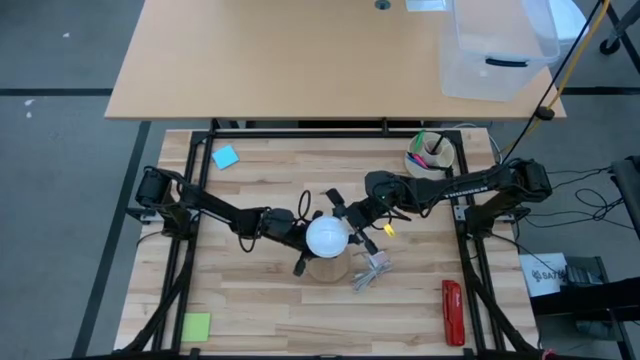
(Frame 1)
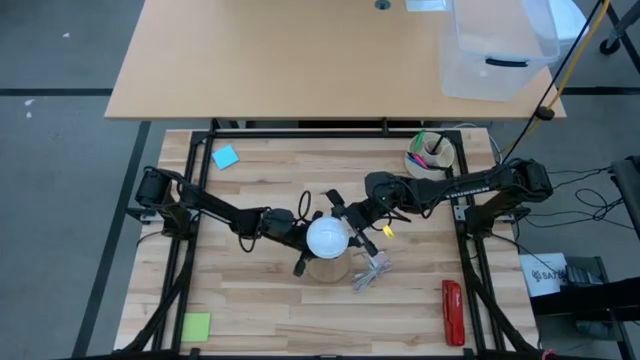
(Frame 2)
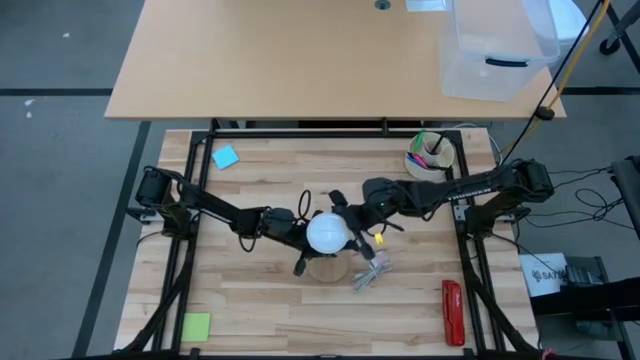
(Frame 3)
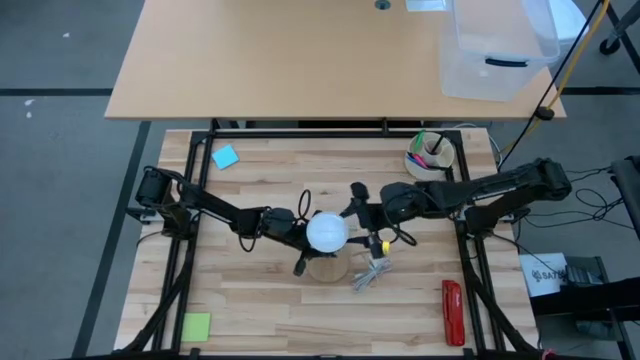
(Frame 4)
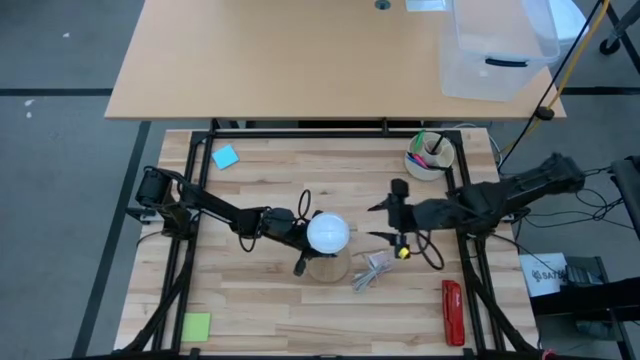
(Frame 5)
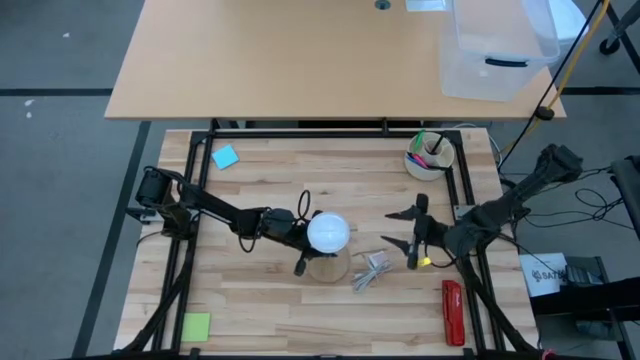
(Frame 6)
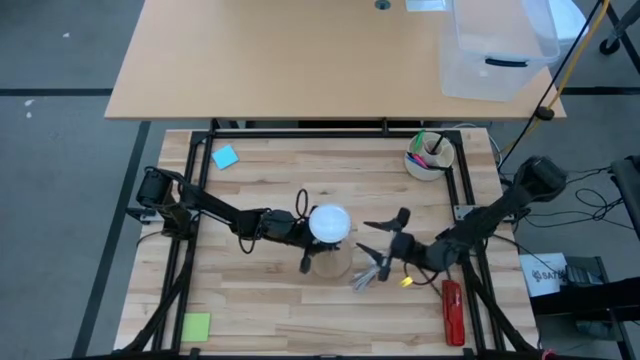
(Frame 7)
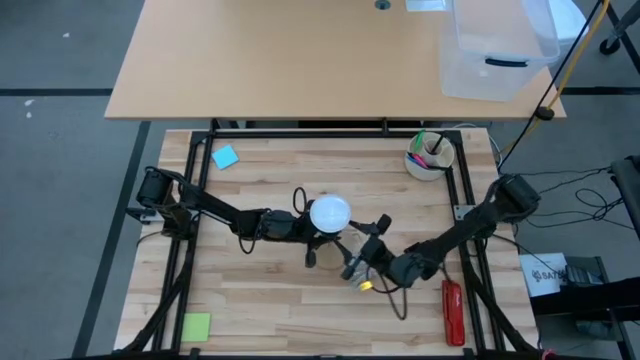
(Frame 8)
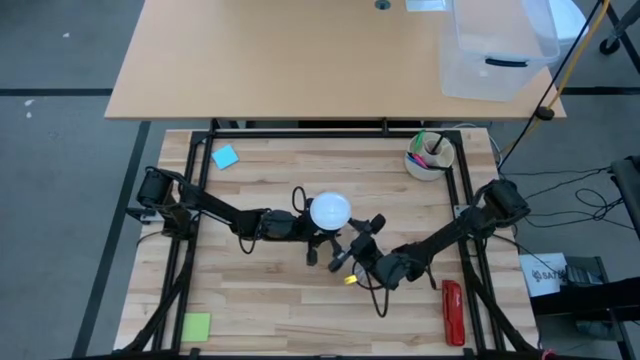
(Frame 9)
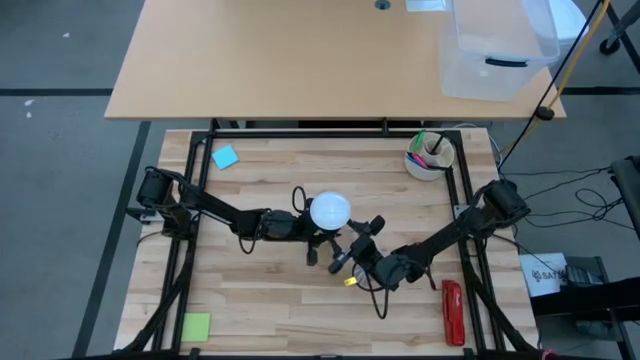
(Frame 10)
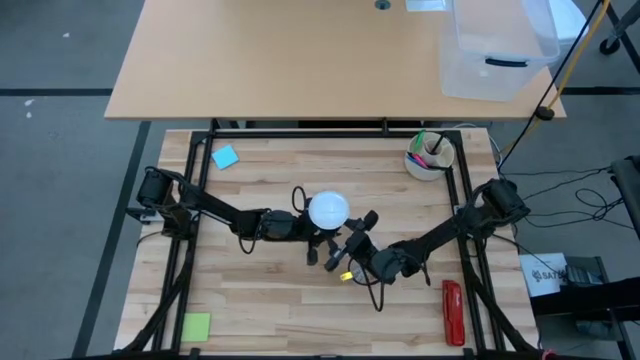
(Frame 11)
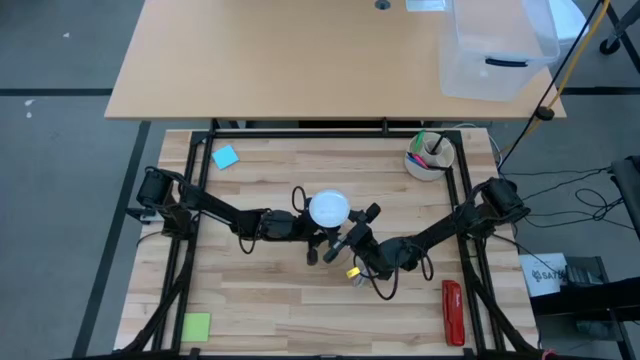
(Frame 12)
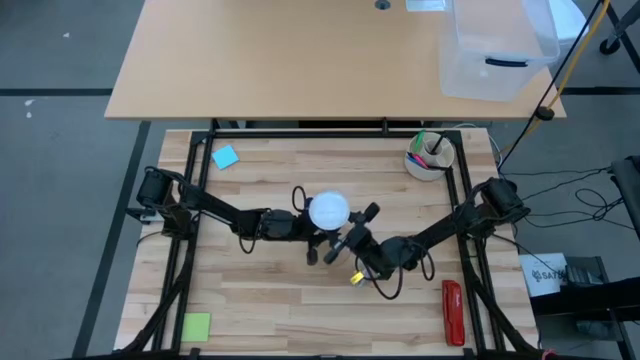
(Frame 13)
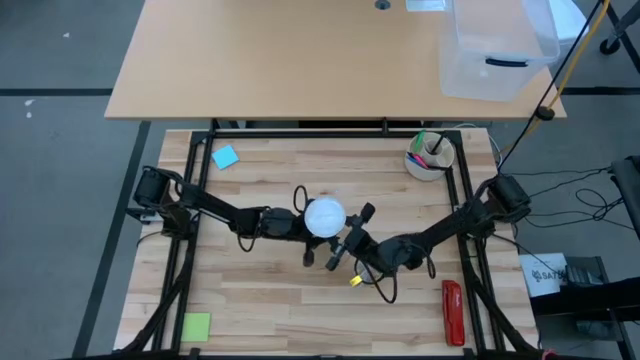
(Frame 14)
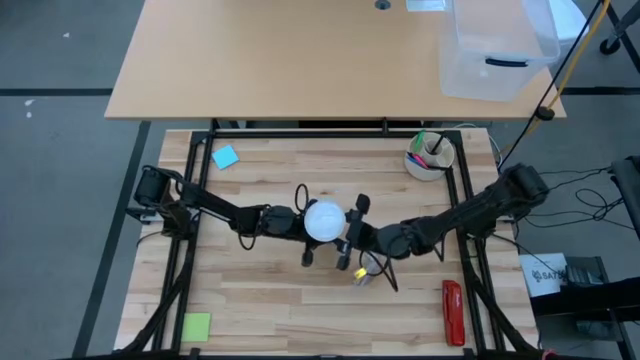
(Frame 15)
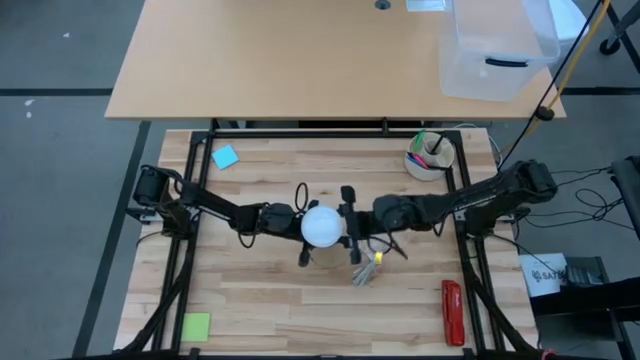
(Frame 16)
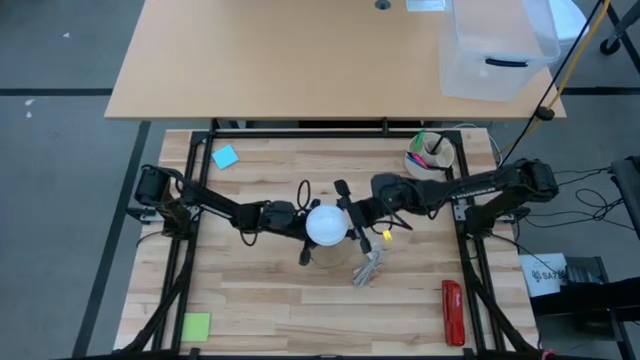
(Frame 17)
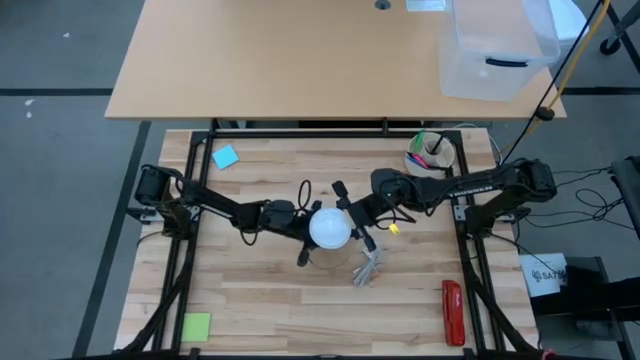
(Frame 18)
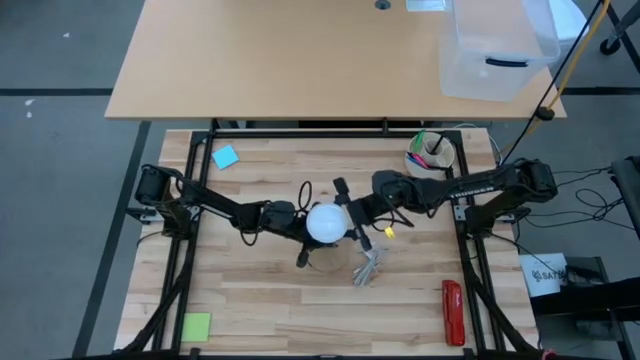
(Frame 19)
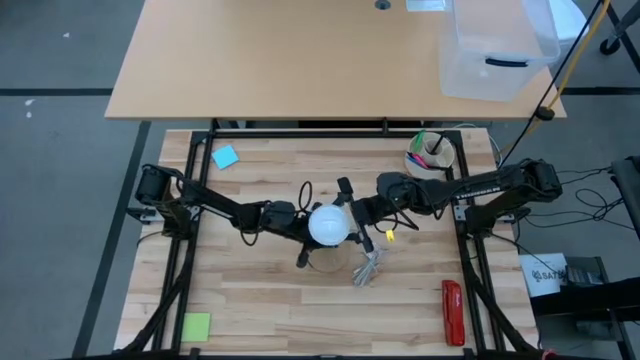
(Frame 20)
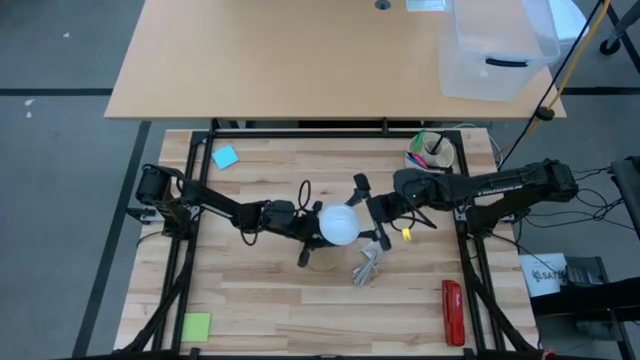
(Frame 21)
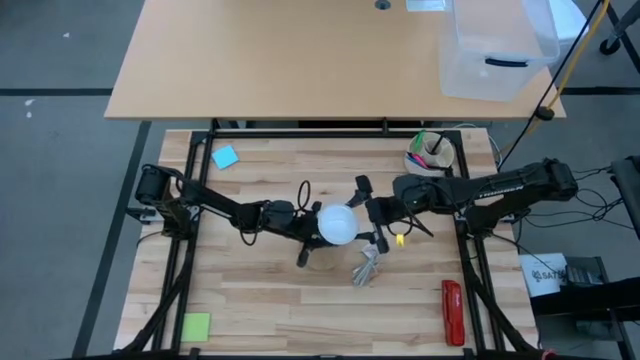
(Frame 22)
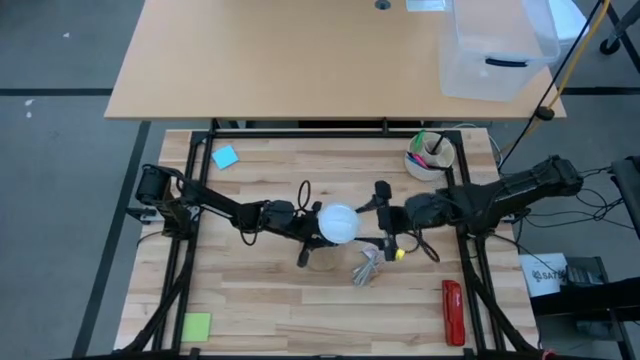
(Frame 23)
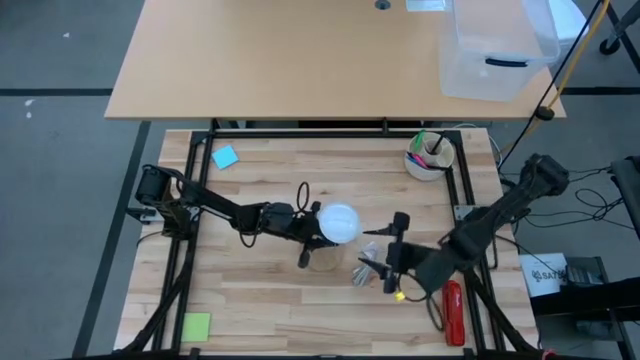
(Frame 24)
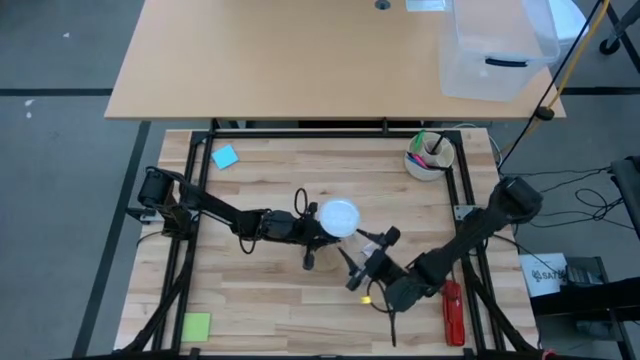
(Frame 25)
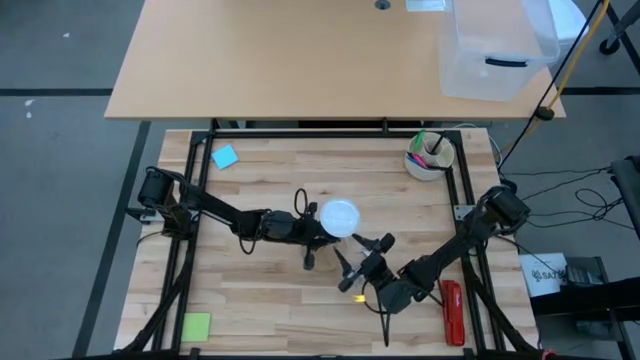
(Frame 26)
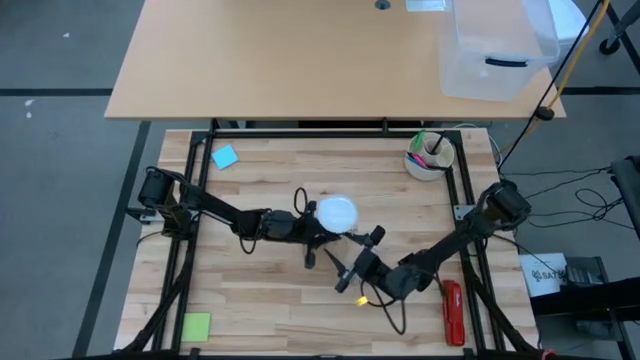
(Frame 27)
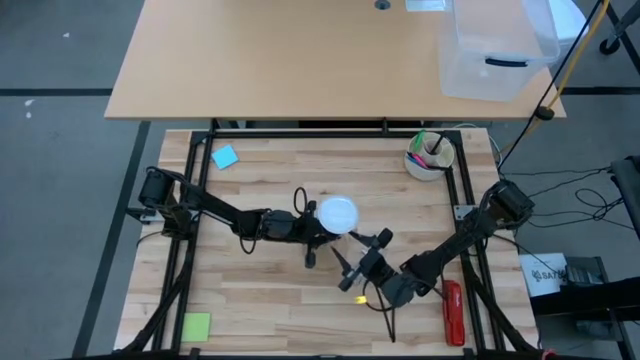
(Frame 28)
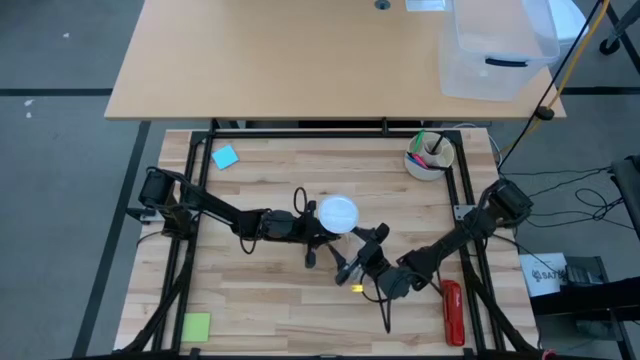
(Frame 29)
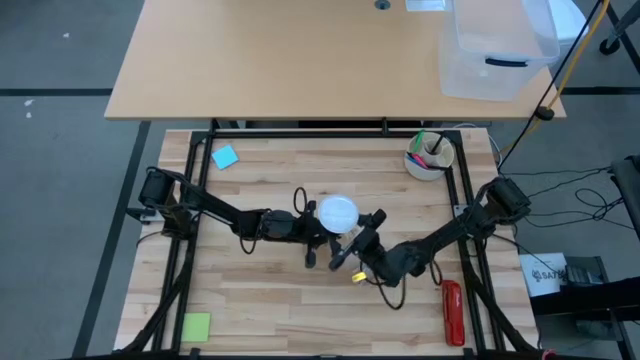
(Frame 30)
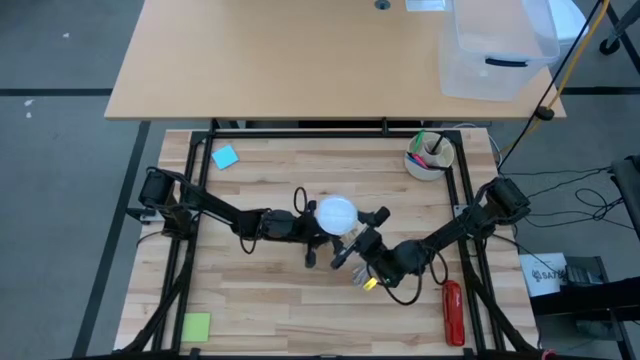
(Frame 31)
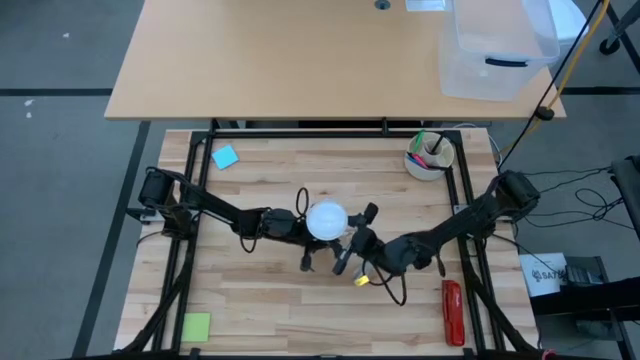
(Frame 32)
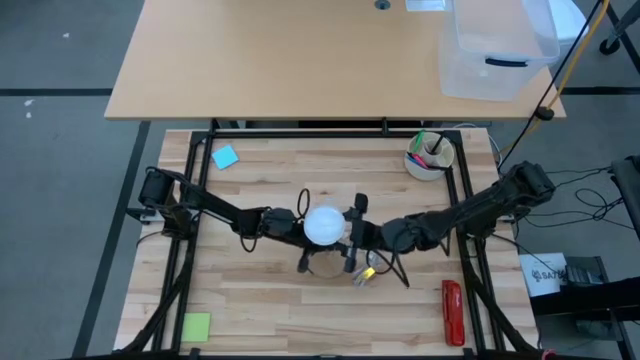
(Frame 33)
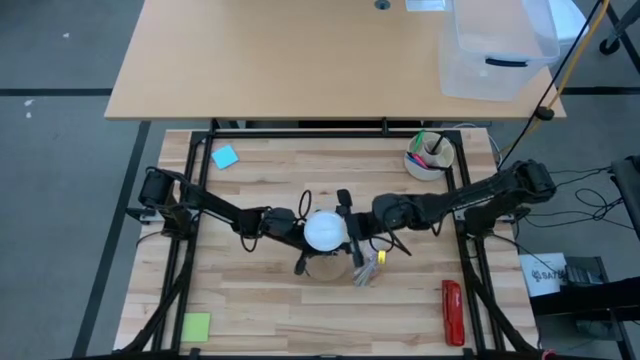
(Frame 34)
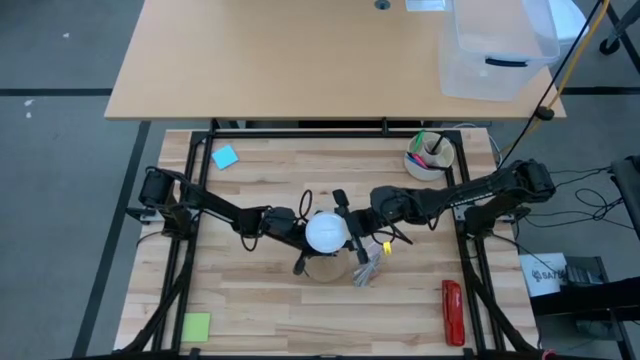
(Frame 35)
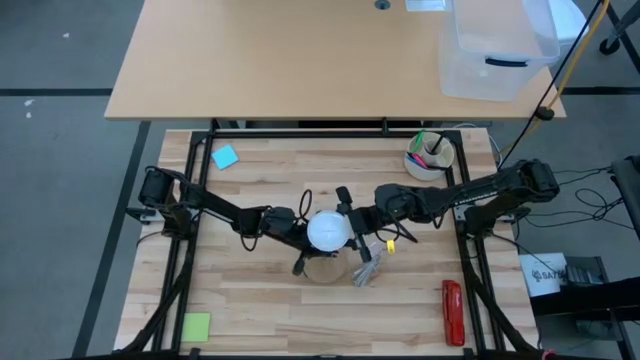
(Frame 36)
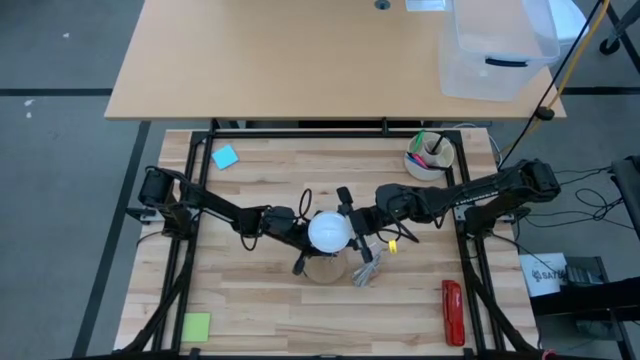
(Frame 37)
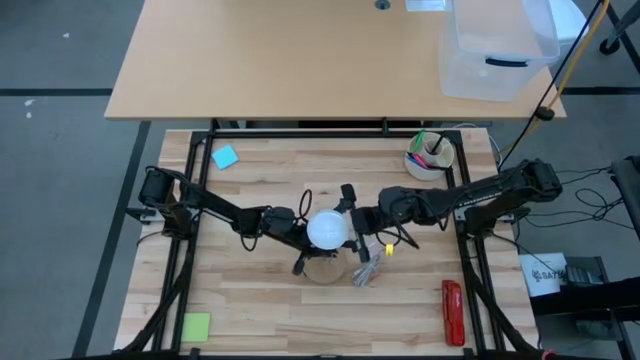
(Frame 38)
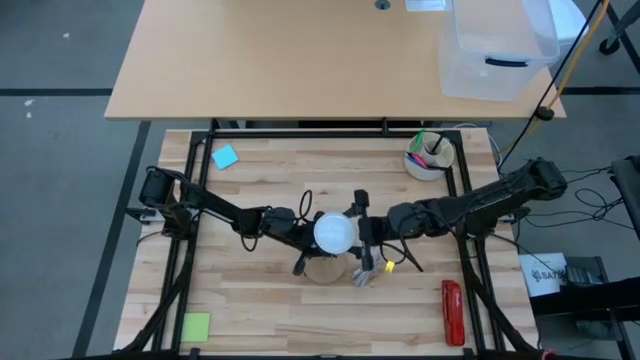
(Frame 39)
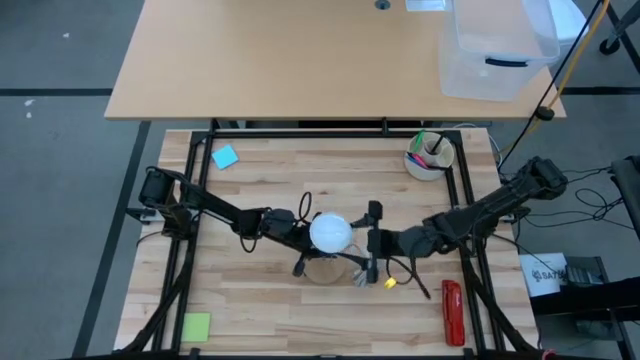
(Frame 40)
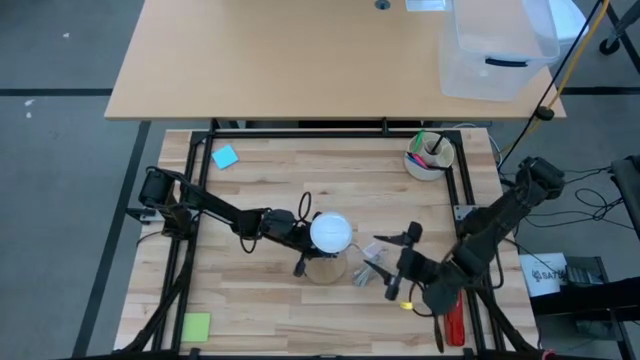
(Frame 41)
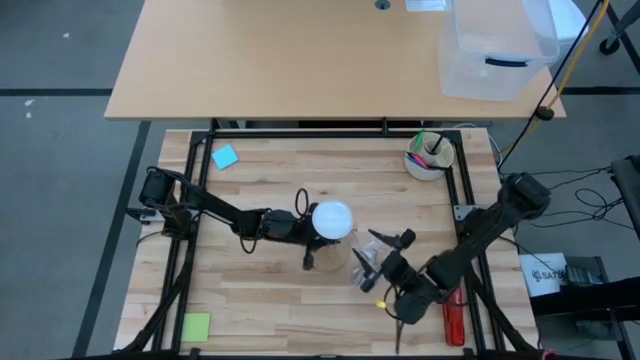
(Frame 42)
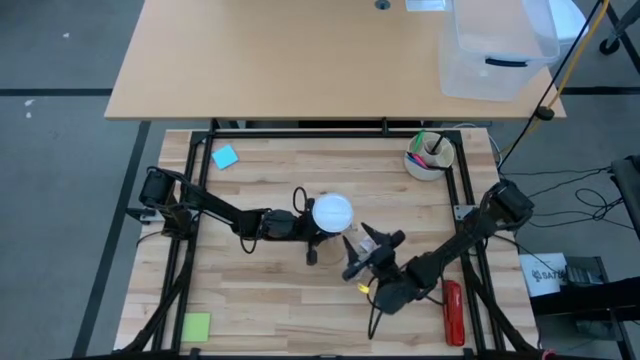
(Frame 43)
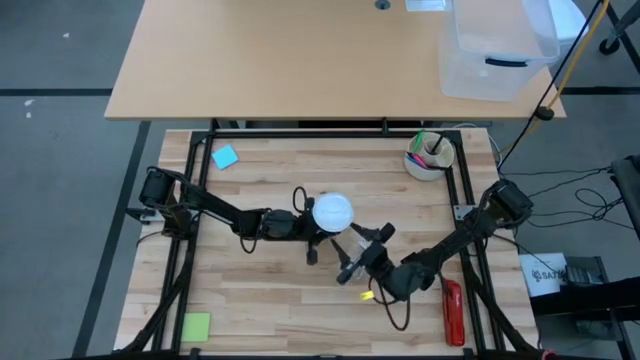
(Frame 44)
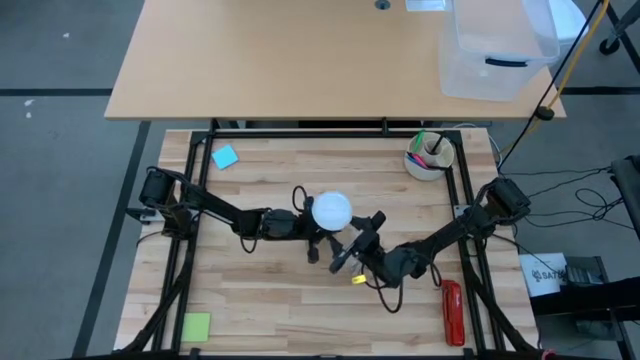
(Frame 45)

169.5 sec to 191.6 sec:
Task: Screw lightbulb
Remove the lightbulb from the lamp
